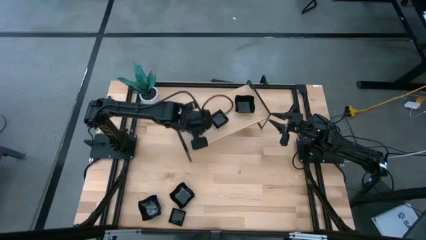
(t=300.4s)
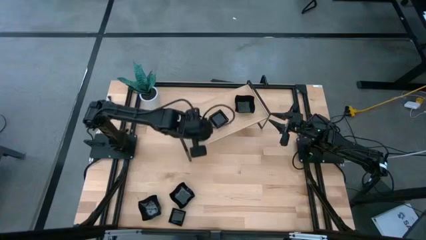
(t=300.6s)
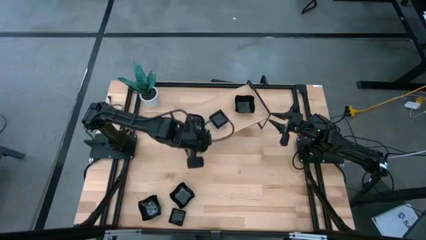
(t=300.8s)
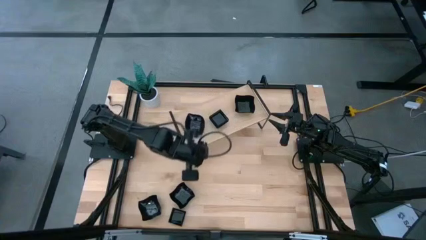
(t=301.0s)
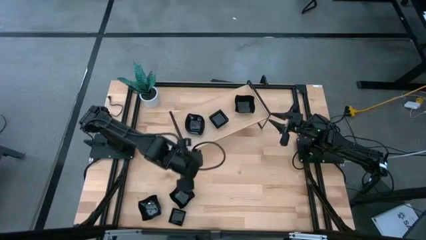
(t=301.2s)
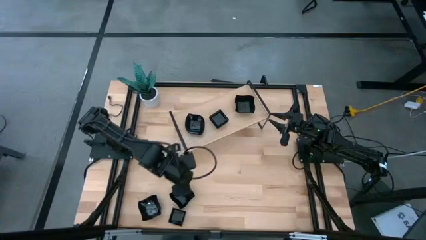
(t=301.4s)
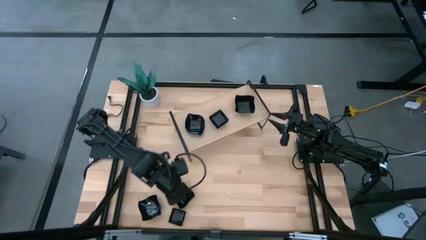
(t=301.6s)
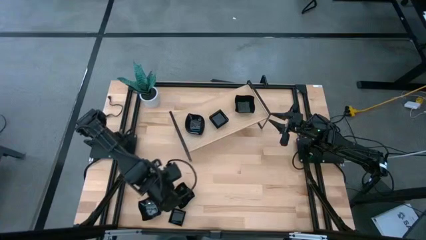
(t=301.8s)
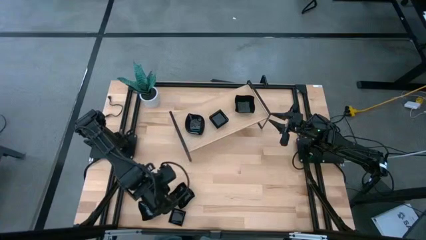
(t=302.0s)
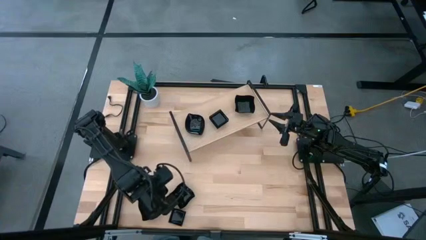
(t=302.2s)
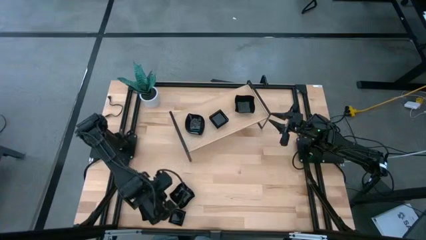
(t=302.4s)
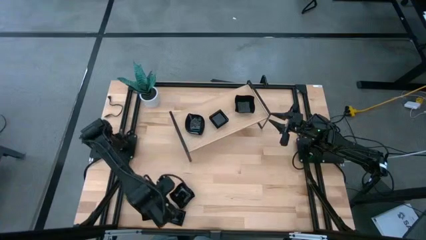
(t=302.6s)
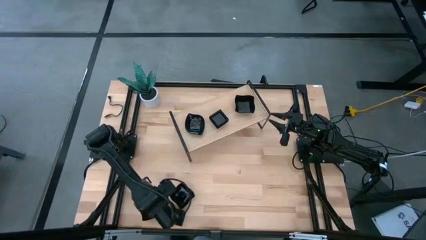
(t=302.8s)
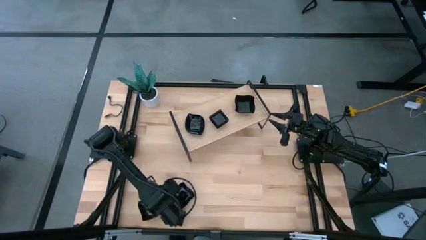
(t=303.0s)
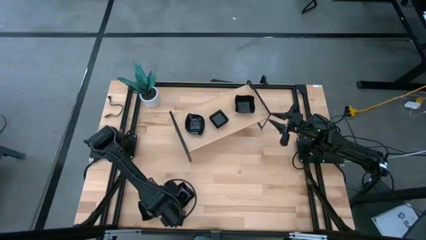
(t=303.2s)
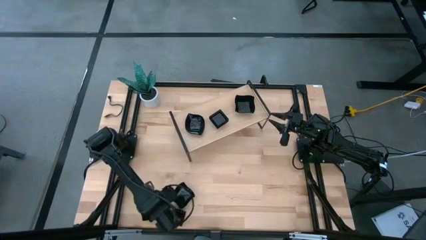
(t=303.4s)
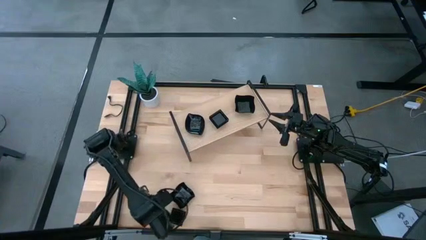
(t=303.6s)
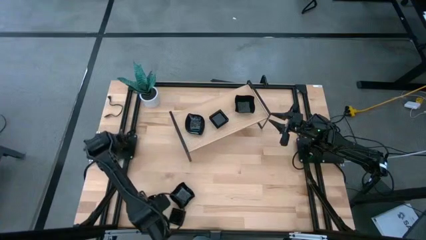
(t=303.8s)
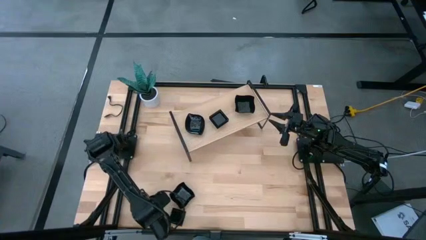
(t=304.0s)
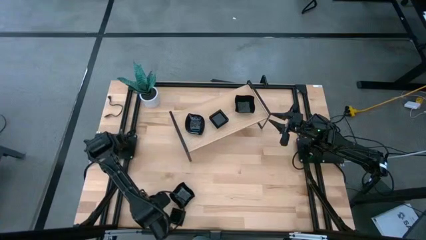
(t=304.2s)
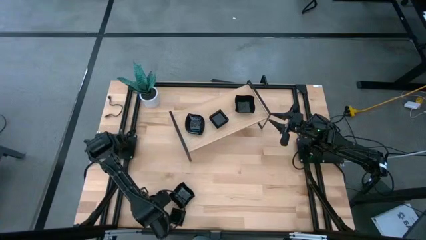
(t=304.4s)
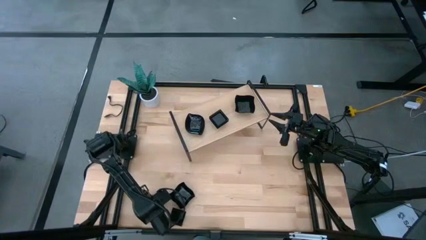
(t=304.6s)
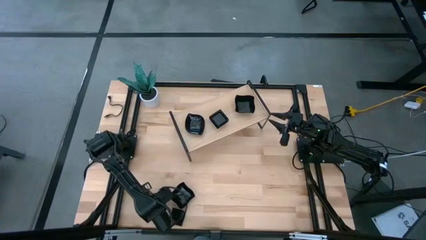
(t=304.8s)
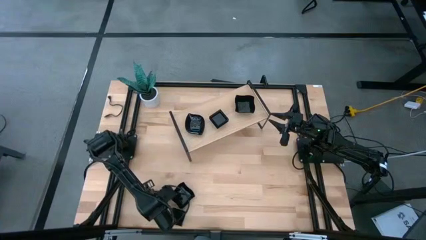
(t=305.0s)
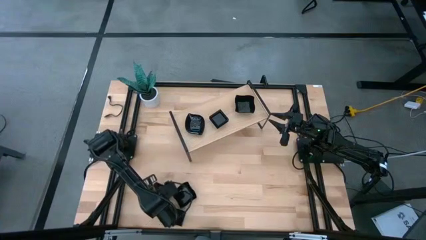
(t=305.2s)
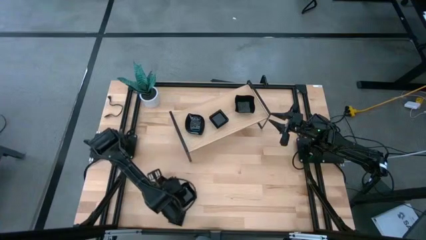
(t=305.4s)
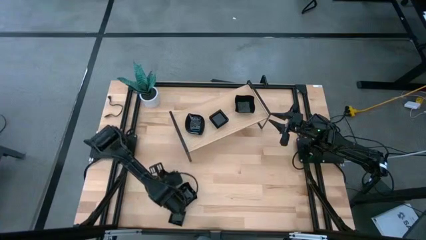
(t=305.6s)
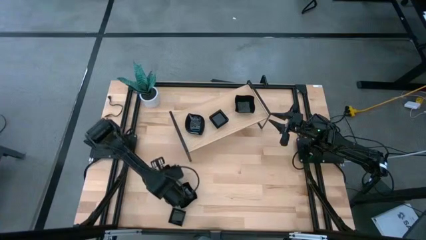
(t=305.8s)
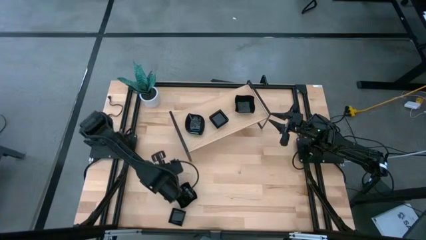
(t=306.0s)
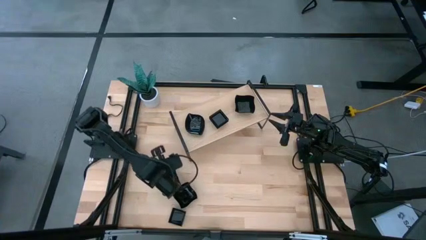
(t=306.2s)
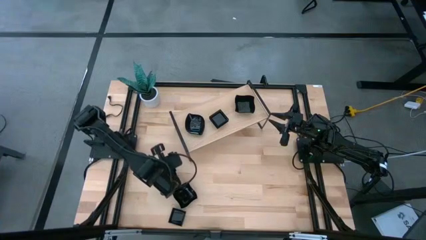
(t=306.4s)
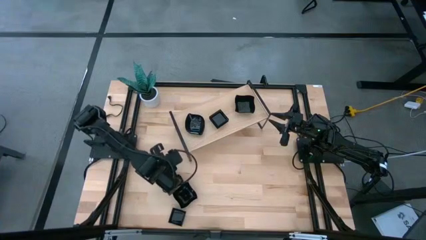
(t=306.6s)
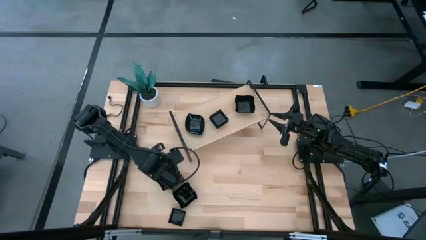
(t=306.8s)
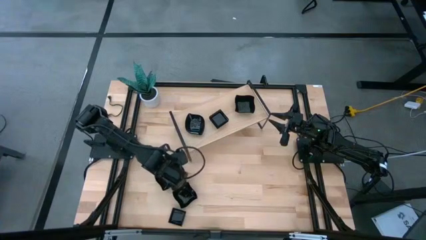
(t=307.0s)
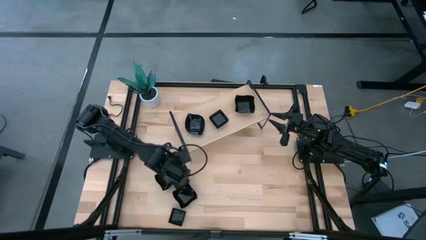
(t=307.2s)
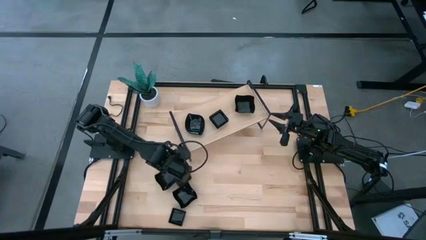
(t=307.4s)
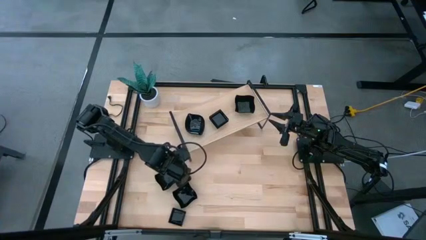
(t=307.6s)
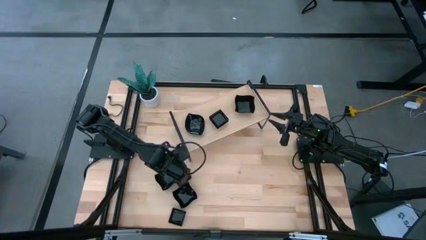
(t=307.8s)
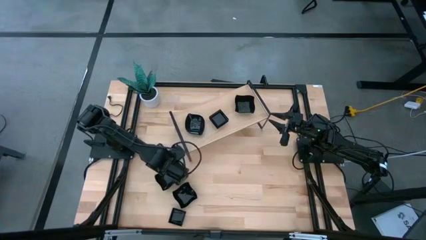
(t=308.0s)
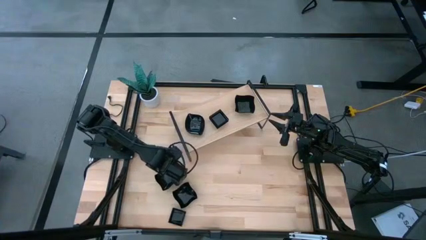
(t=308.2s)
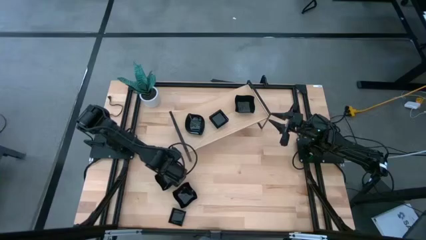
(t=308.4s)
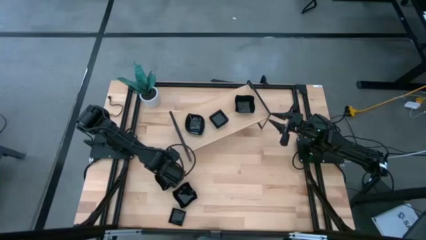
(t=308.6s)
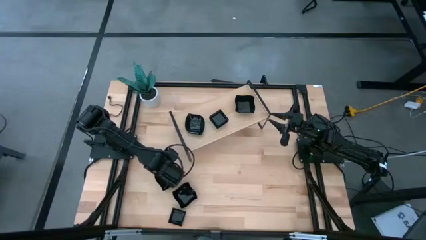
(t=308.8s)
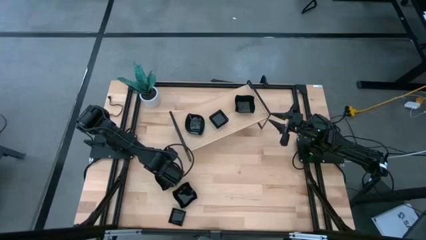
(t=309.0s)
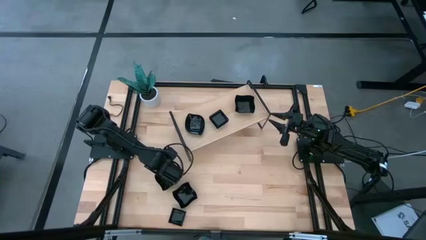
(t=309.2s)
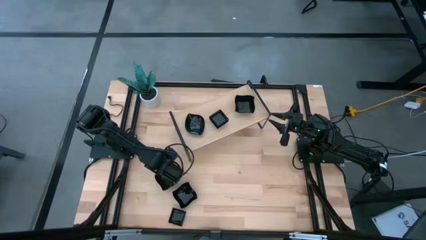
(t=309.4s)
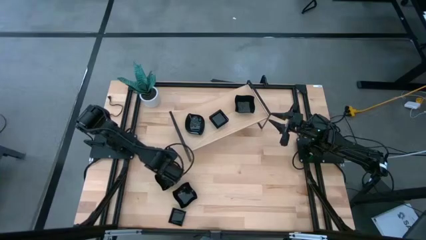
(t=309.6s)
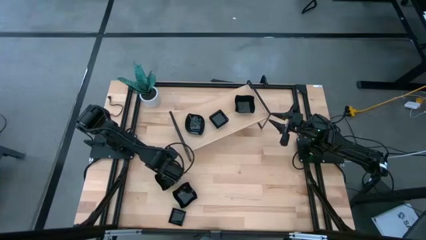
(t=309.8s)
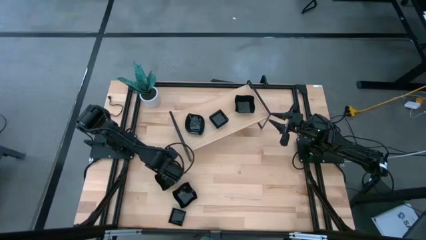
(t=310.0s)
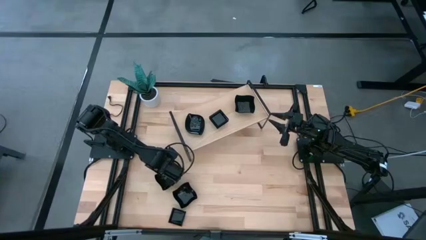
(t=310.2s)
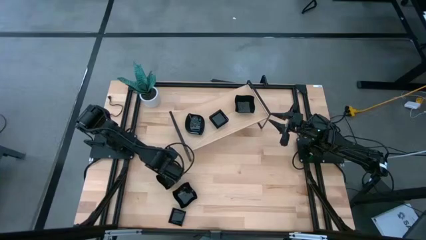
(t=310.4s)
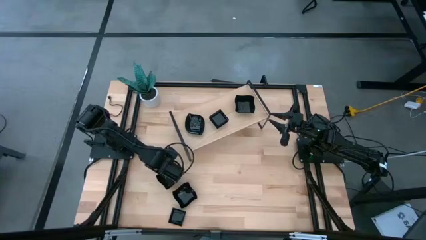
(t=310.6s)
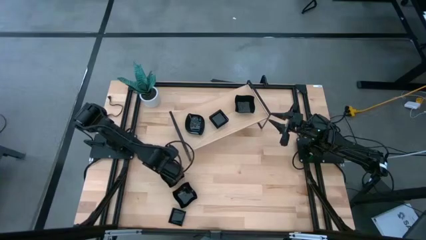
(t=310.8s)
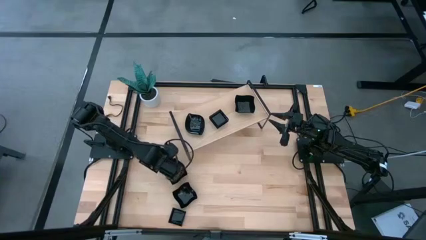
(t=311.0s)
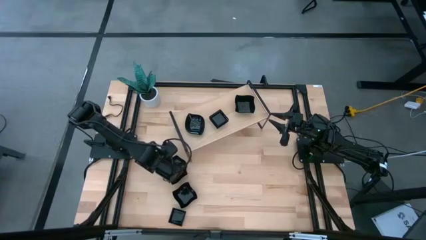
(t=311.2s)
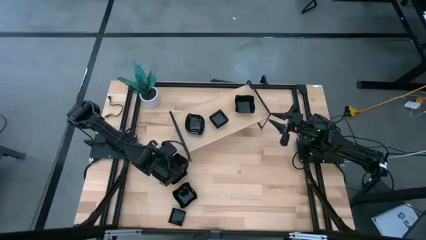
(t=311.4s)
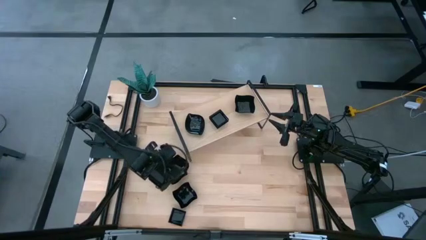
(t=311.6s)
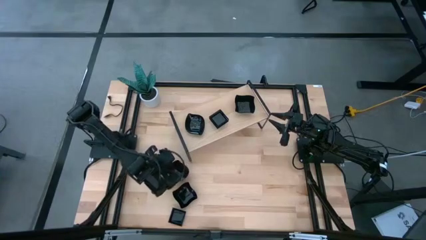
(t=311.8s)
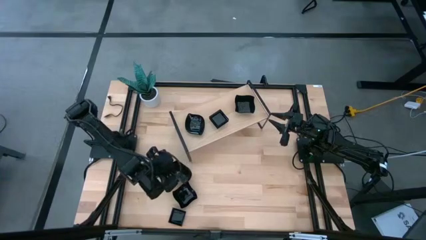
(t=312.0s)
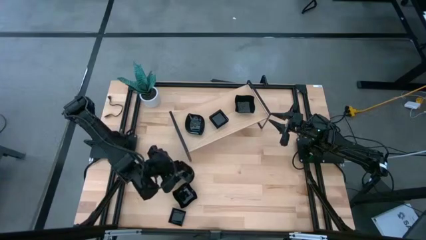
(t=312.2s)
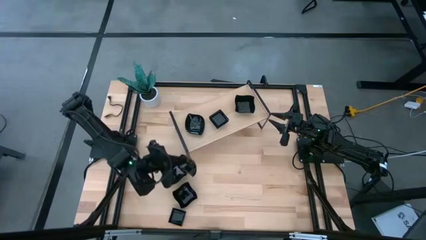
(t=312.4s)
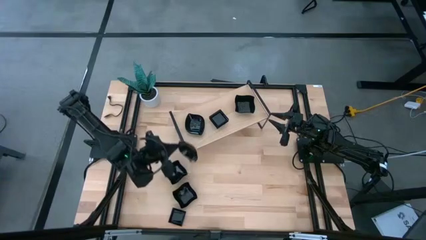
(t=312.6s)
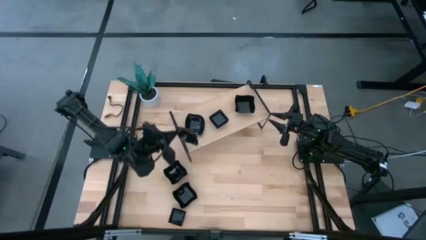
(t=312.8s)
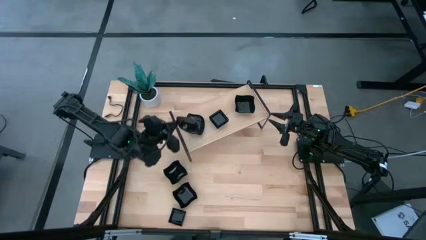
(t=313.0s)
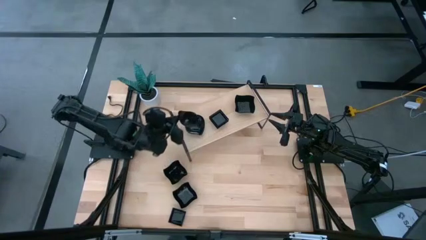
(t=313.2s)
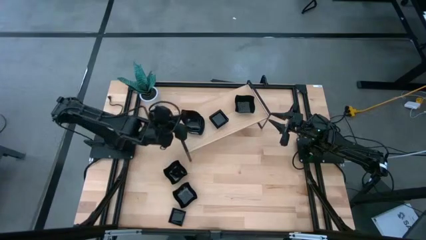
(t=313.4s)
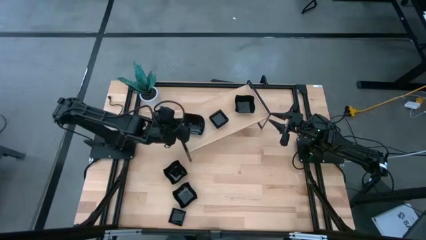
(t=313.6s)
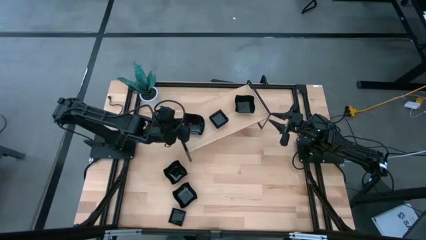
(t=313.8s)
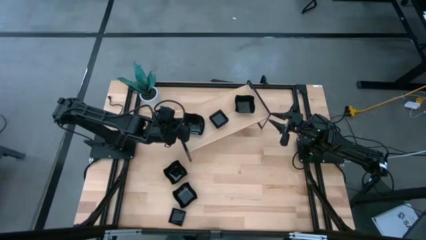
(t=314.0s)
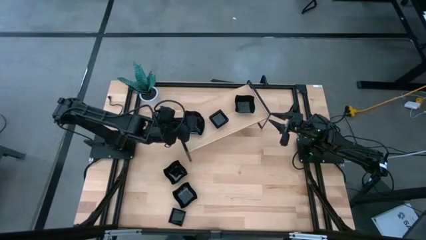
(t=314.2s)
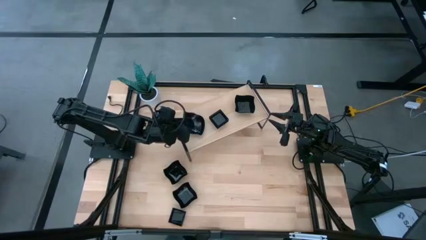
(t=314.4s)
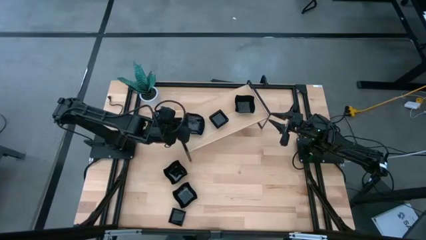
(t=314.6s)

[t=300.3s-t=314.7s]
Task: Pick & Place Mini shaped plates
Stack the black leaf-shaped plate on top of the black leaf-shaped plate on the shelf

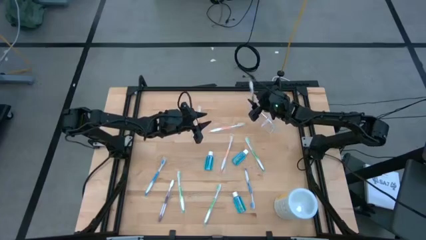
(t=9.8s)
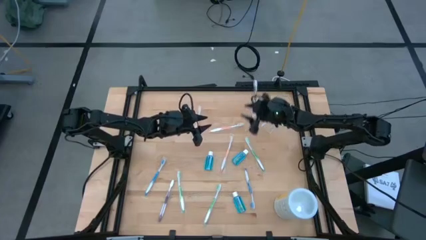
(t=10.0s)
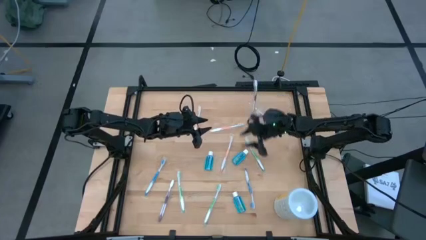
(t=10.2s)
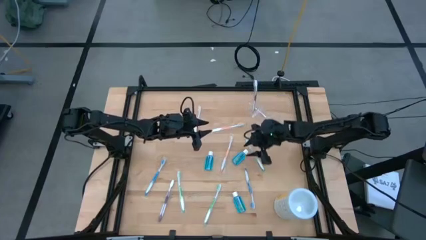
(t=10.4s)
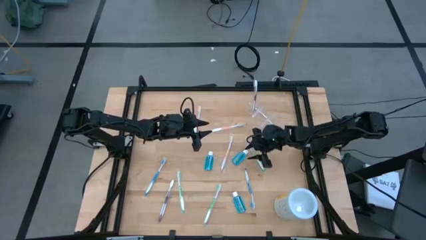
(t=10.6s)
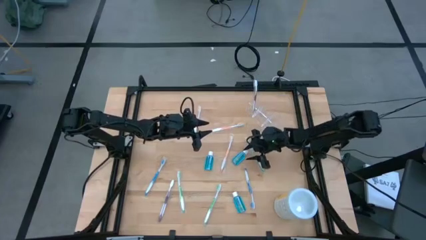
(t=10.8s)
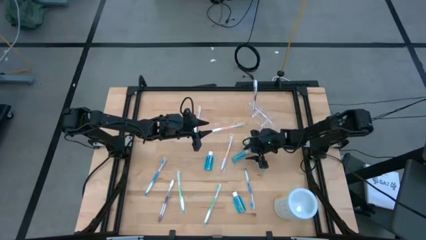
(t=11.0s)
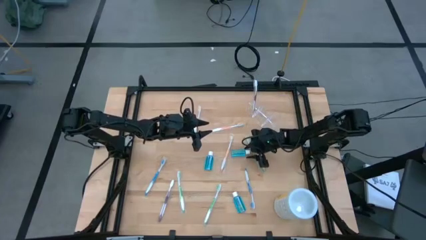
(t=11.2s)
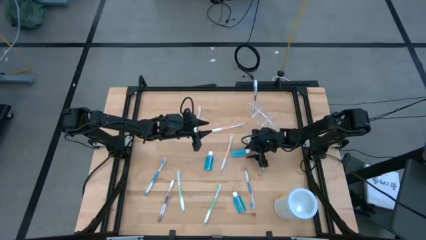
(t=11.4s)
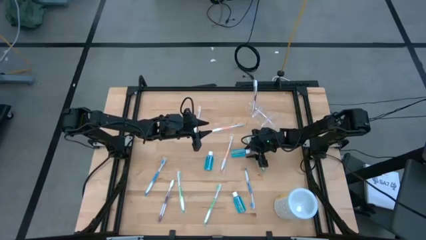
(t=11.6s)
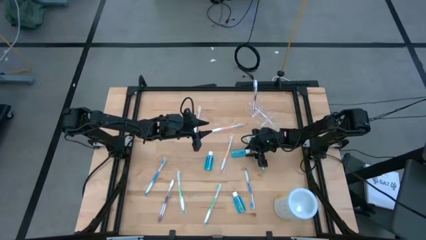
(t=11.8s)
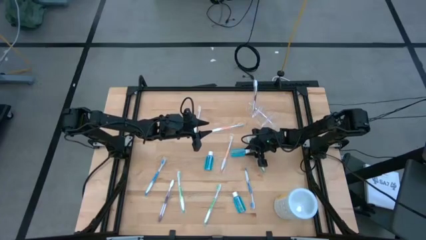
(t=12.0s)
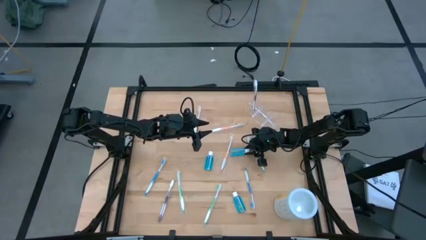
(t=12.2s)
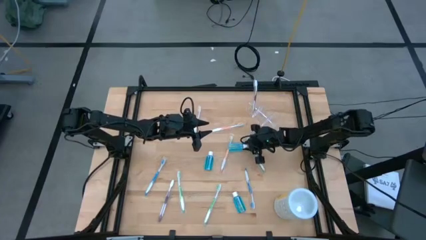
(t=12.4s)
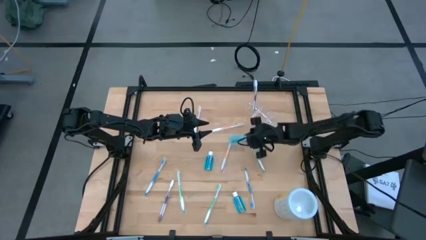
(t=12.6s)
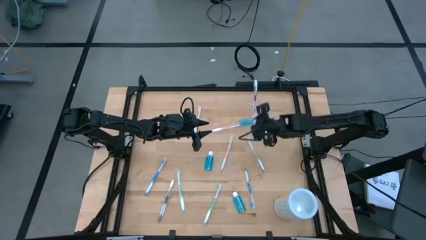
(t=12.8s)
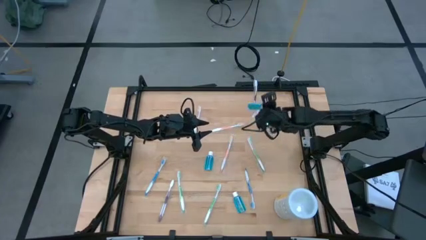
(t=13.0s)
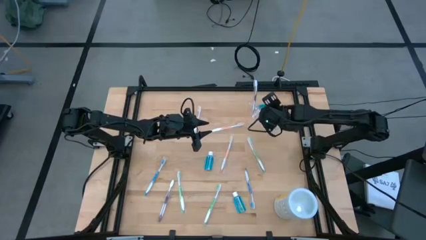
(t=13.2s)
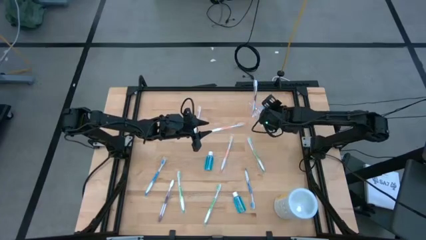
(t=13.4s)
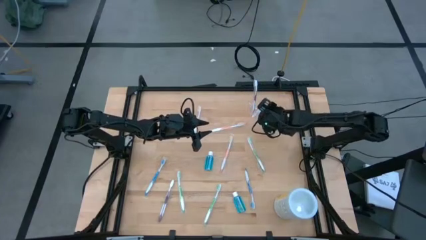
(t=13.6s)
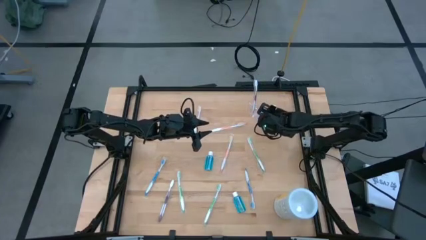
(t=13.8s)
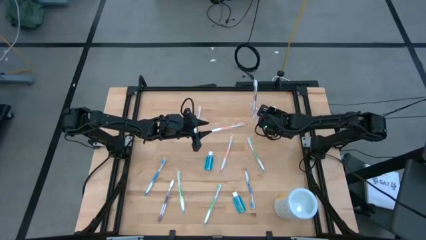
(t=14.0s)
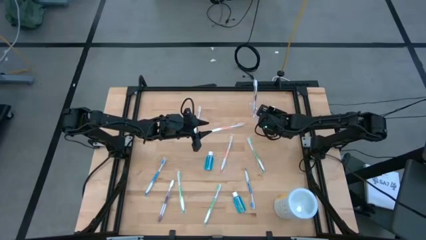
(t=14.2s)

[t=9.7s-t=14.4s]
Task: Pick & Place toothbrushing station
Put the top right blue mouthwash into the transparent organizer
